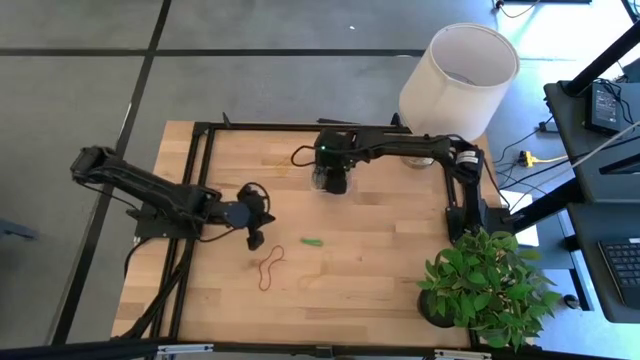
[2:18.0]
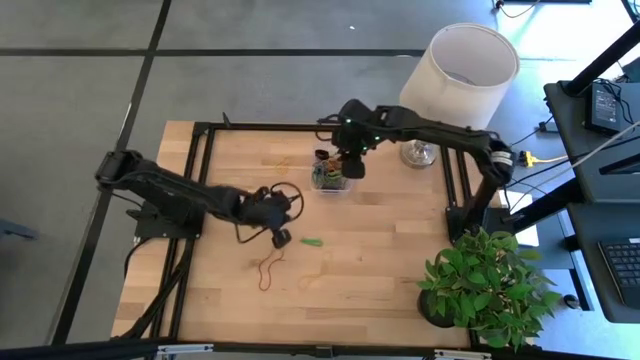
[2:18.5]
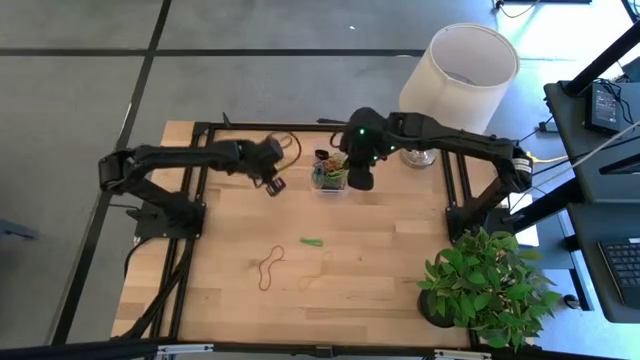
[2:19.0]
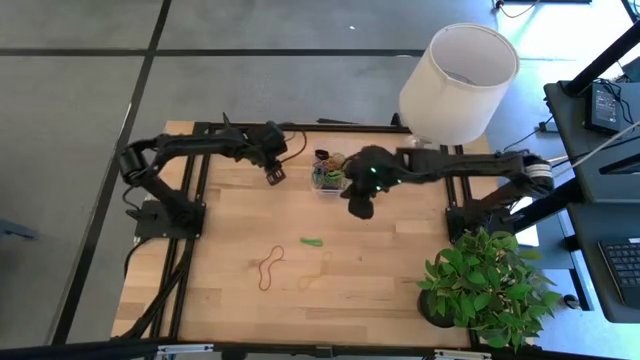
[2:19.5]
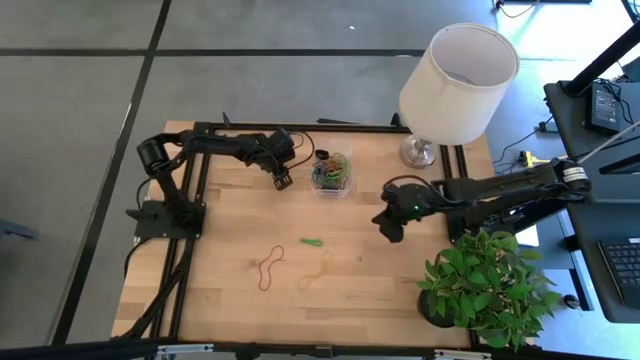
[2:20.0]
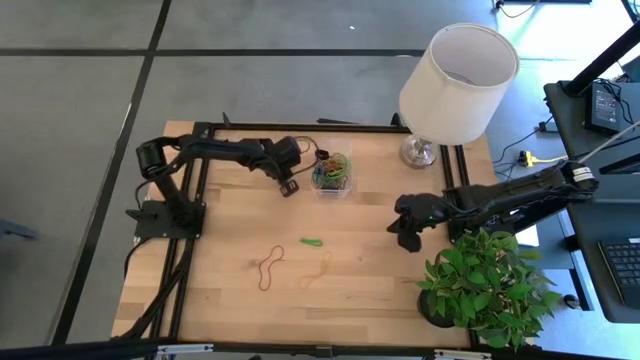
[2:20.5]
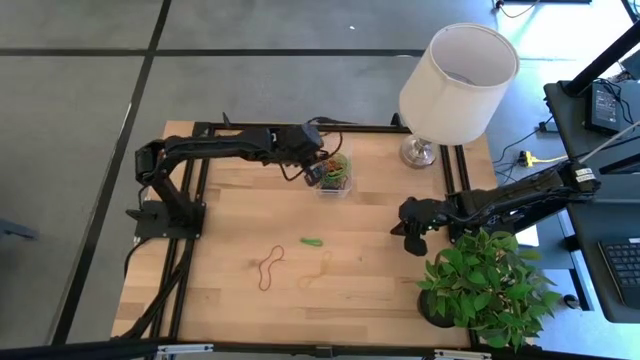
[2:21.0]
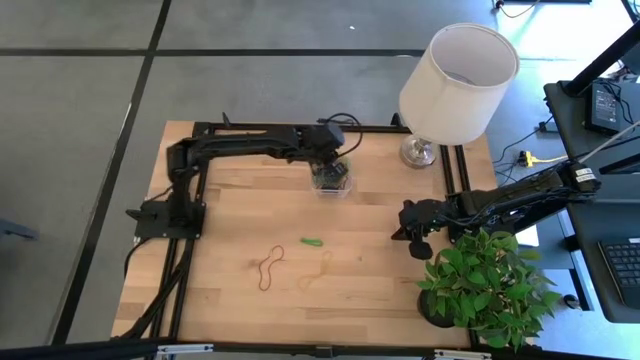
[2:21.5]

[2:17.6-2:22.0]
Task: Pick and place rubber bands into bin
Put the yellow rubber band into the transparent bin

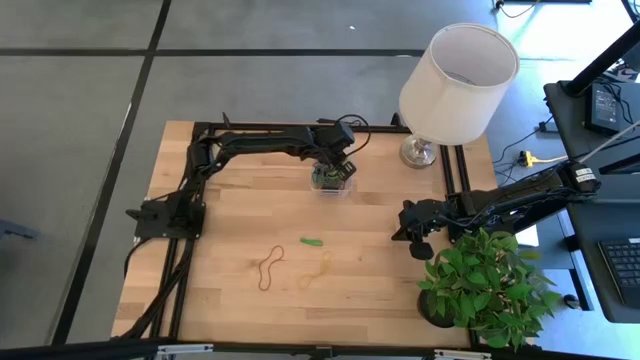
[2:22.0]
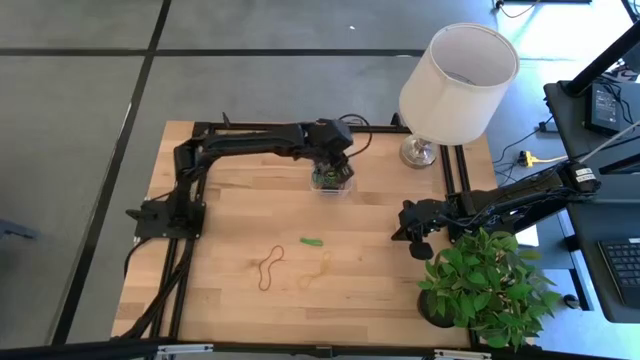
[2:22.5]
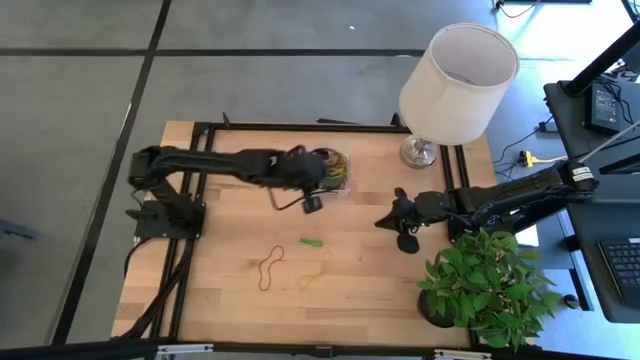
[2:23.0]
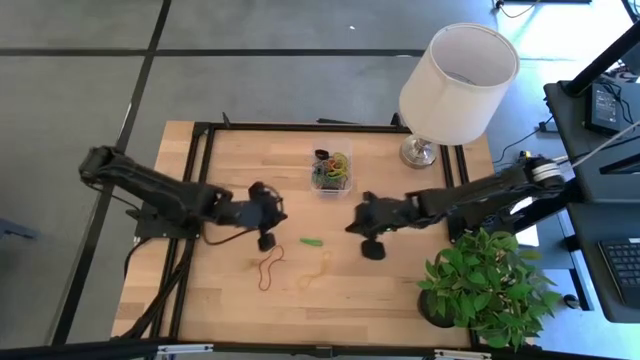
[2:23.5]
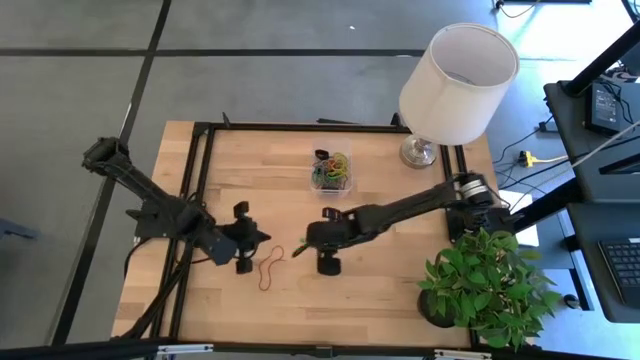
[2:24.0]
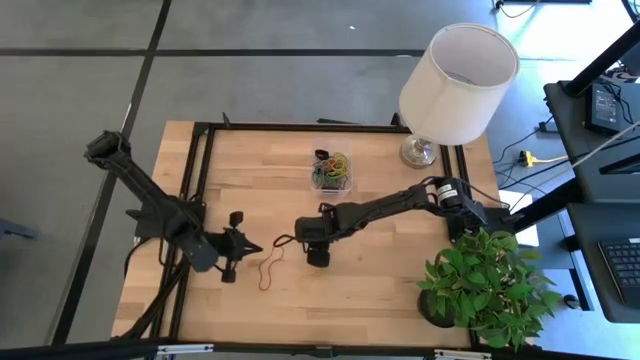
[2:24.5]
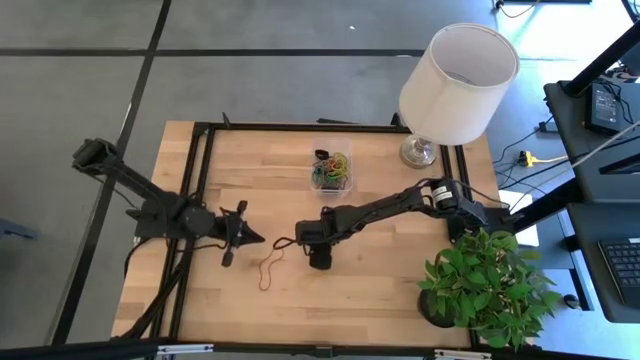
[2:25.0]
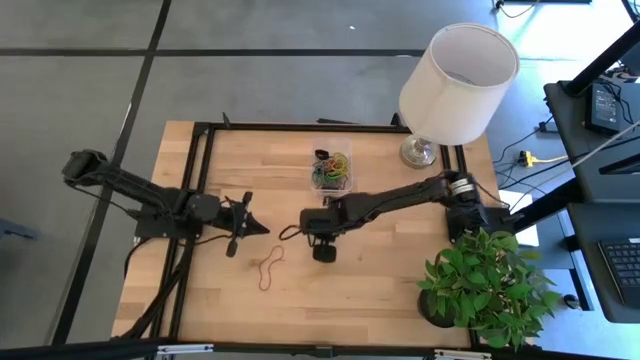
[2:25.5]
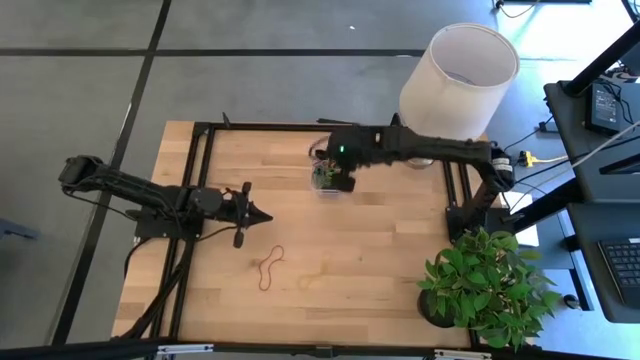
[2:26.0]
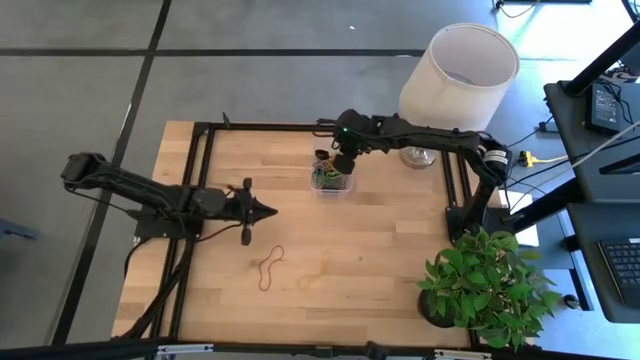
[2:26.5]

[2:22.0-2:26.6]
Put the green rubber band into the transparent bin

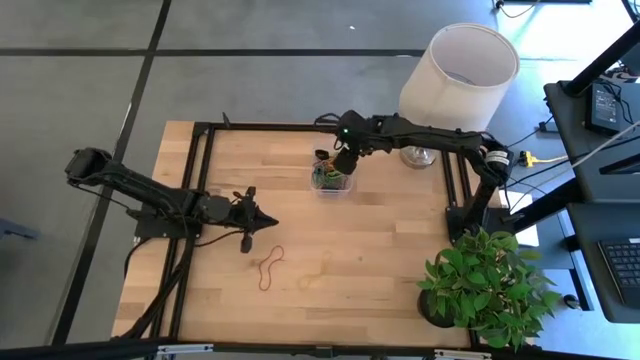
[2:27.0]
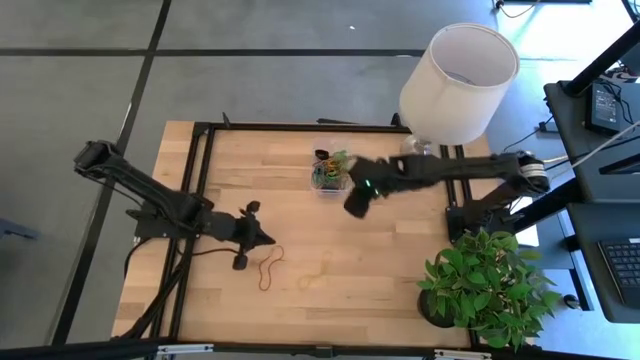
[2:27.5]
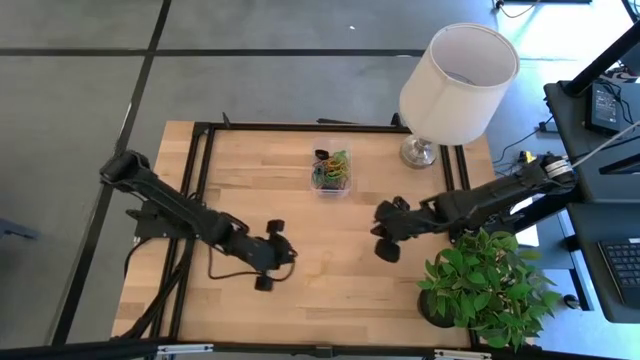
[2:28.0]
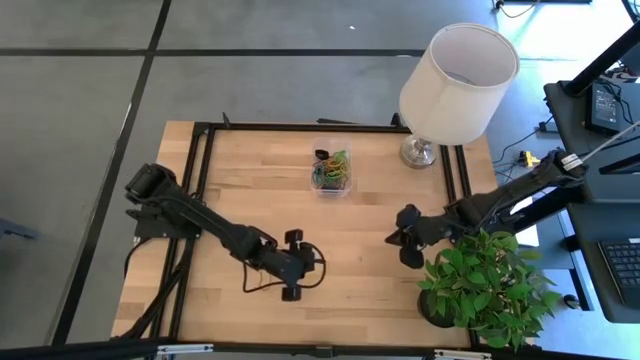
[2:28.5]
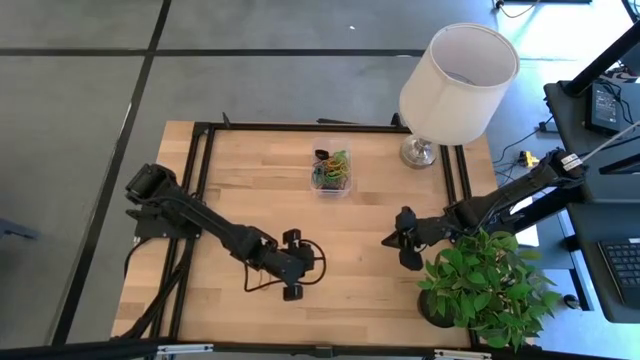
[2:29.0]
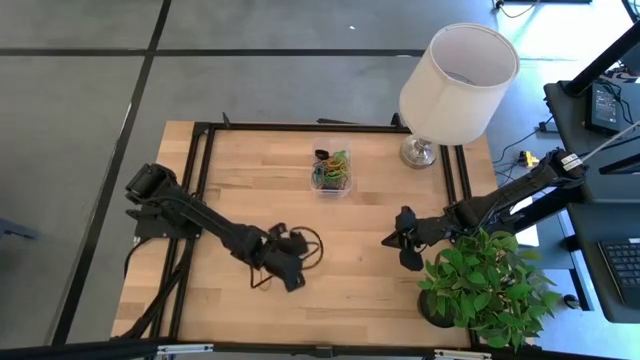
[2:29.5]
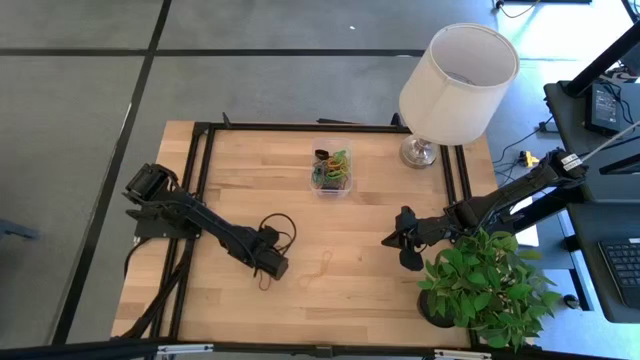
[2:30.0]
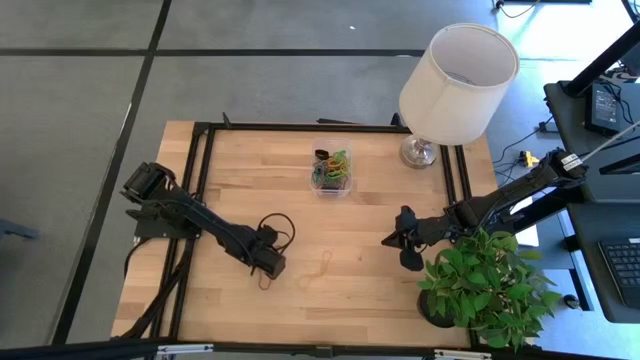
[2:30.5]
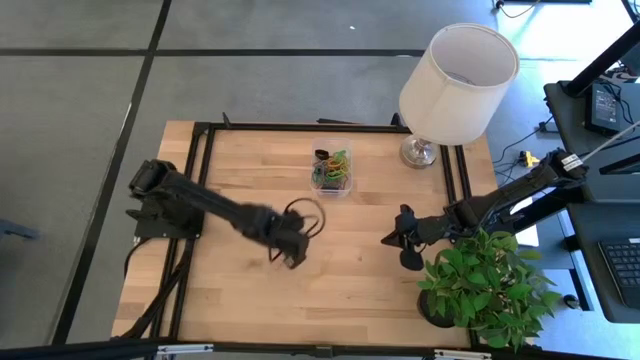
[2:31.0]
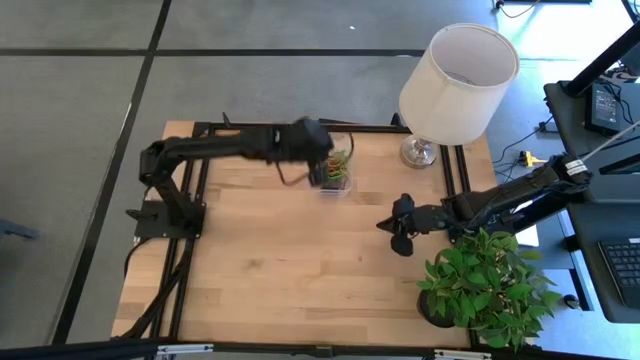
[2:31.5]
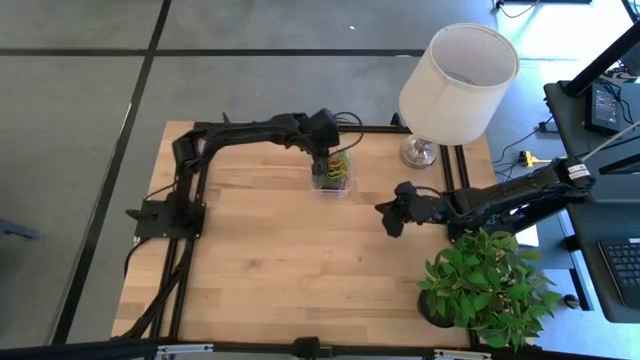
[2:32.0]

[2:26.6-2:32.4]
Put the red rubber band into the transparent bin

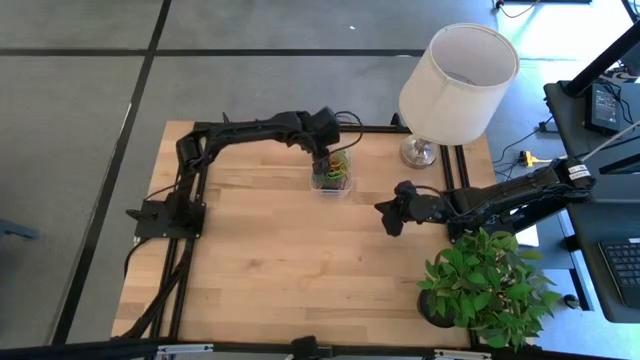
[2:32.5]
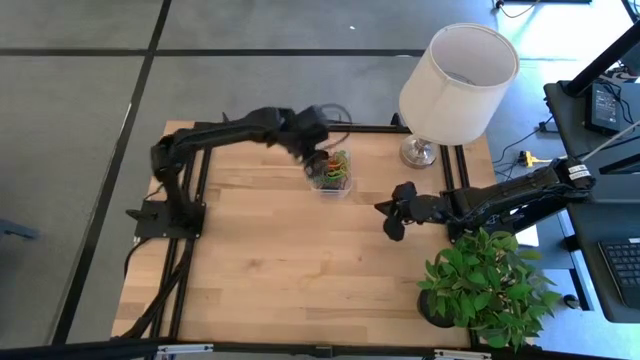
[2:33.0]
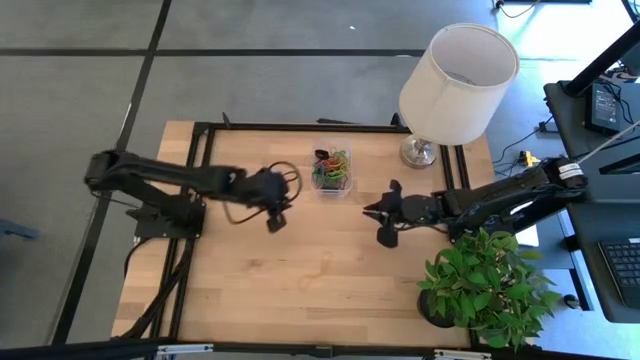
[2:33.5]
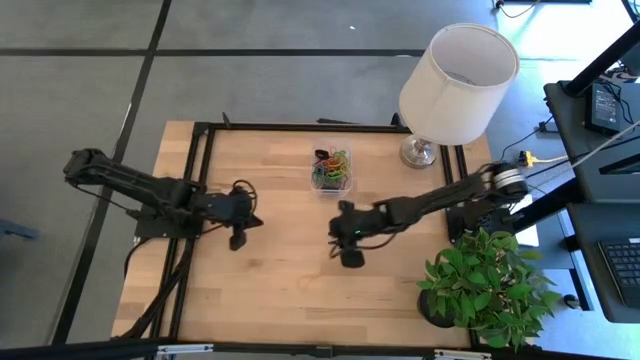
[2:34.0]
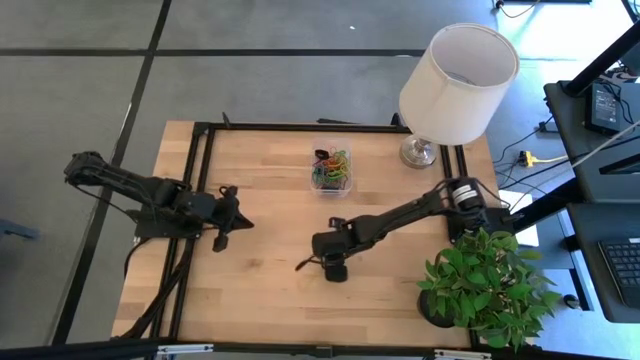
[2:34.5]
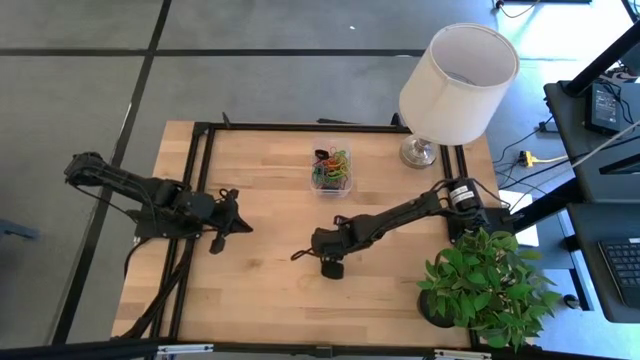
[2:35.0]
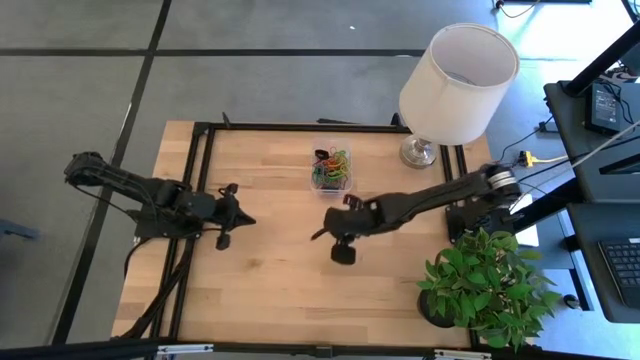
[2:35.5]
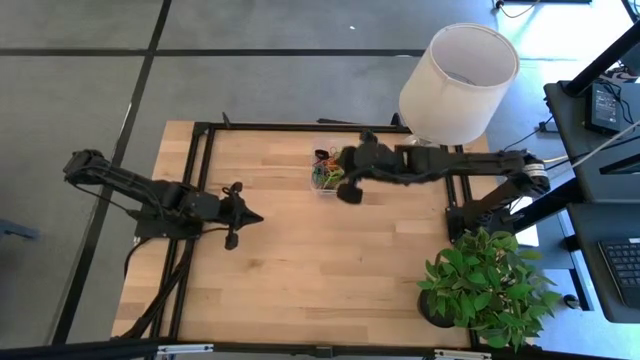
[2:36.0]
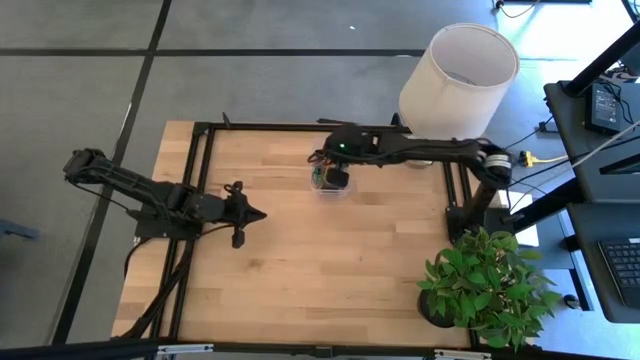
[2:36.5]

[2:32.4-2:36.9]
Put the yellow rubber band into the transparent bin

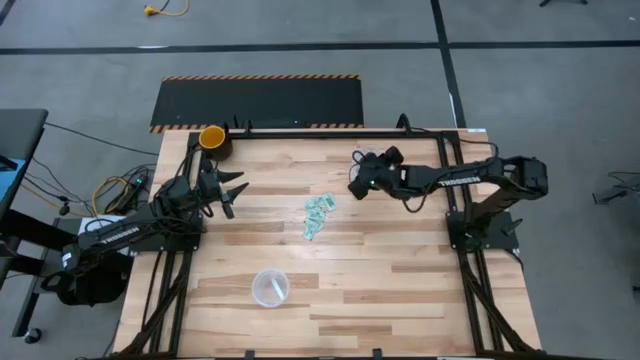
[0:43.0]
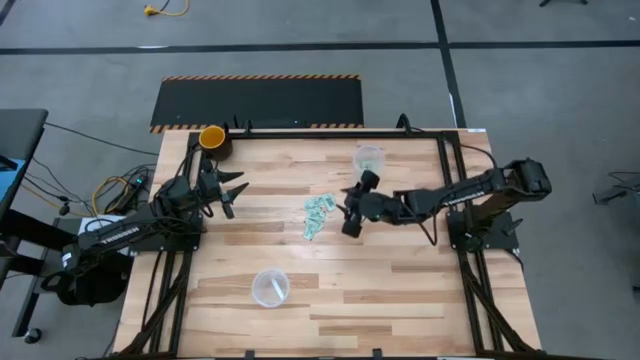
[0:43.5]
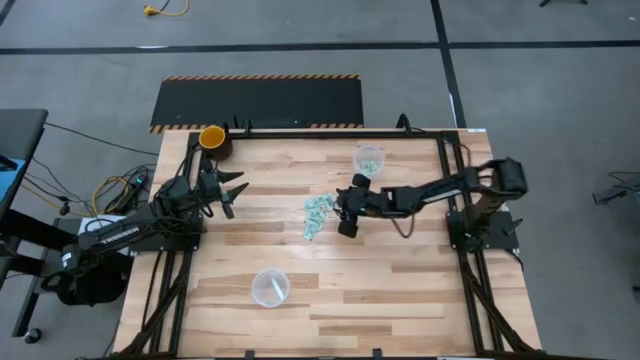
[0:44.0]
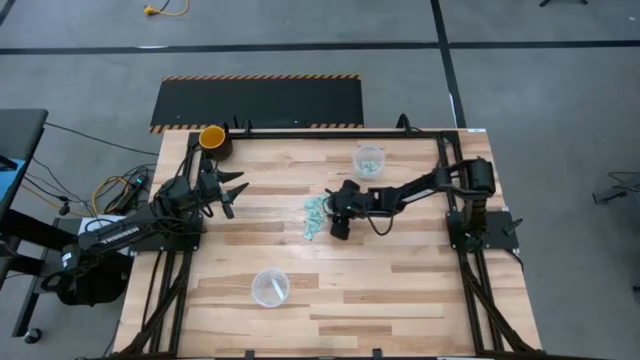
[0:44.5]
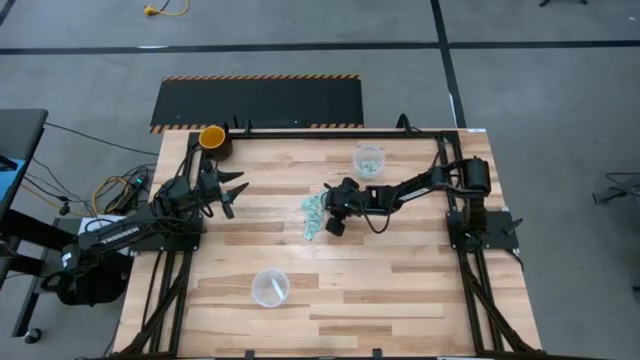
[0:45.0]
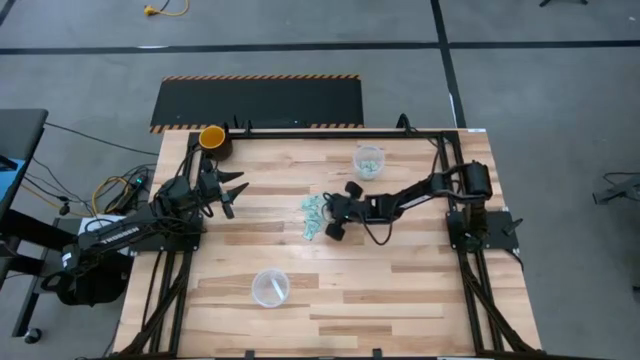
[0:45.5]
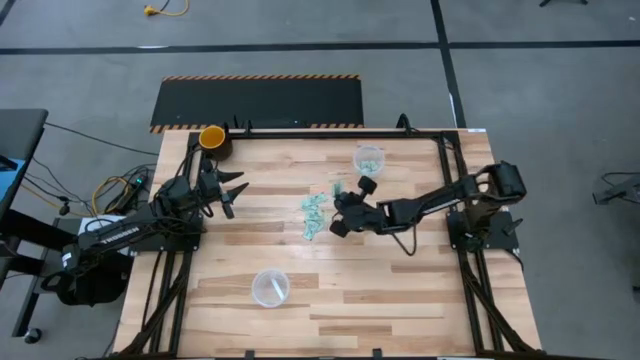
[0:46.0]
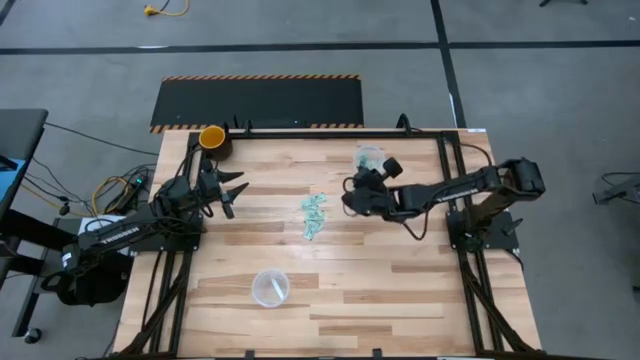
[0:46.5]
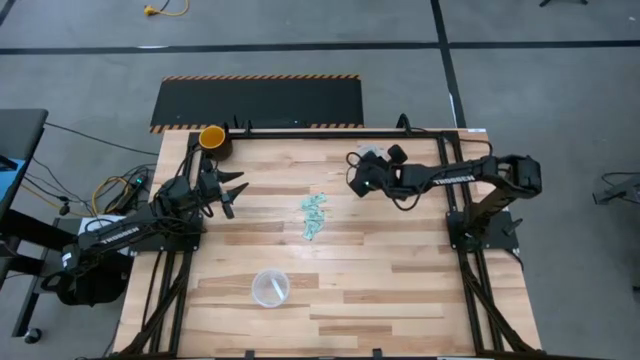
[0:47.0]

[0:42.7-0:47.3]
Task: Pick and place Stevia / Truvia into bins
Put the stevia packet into the top container
